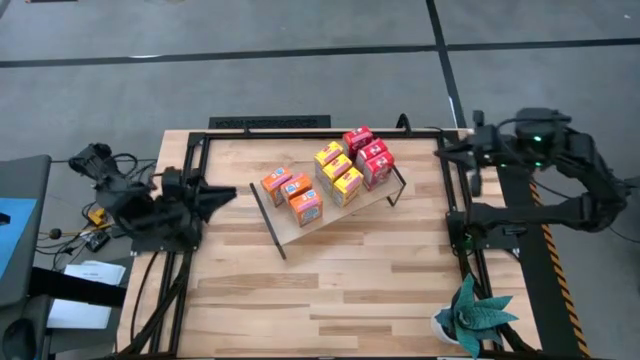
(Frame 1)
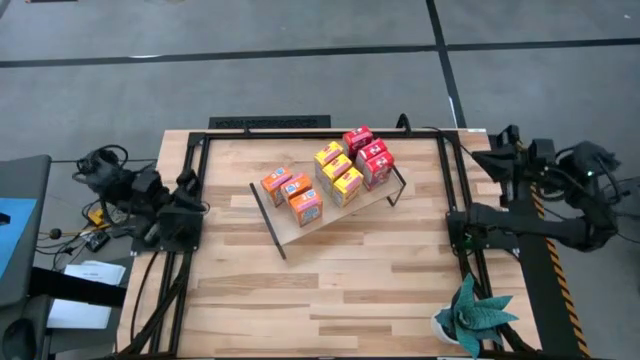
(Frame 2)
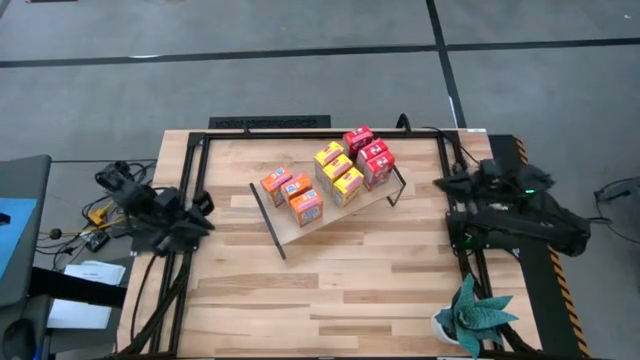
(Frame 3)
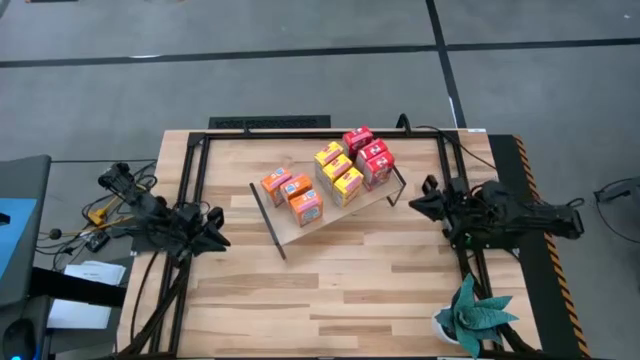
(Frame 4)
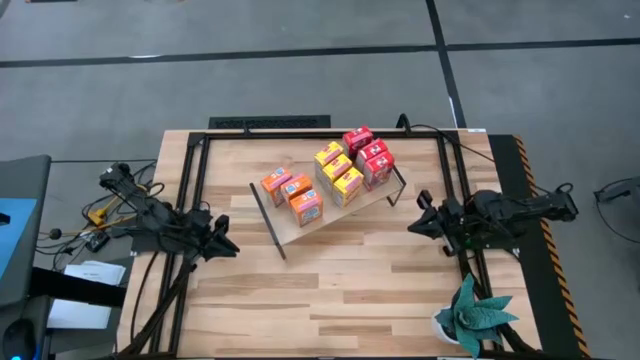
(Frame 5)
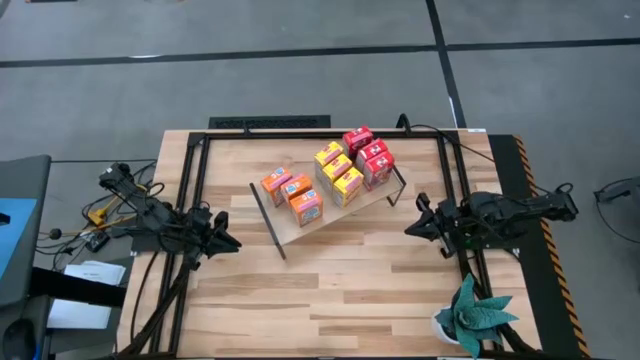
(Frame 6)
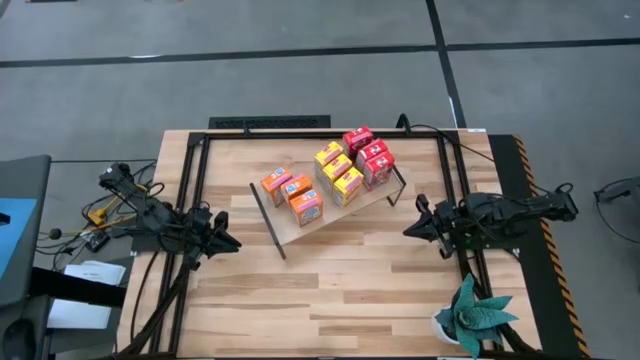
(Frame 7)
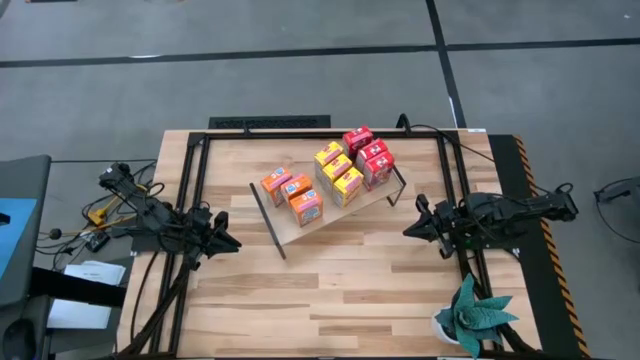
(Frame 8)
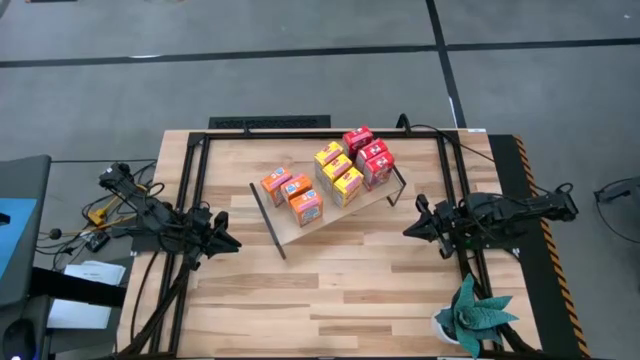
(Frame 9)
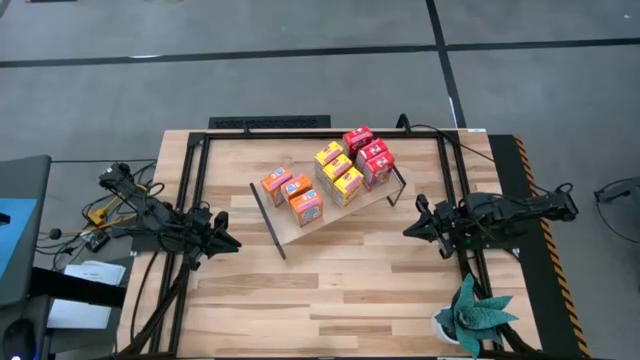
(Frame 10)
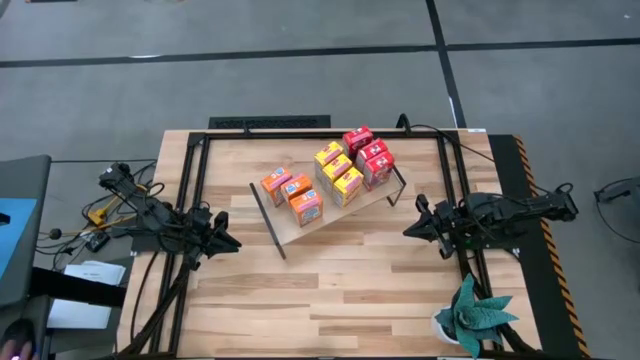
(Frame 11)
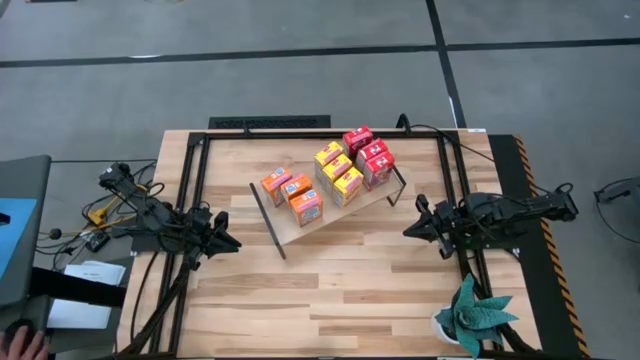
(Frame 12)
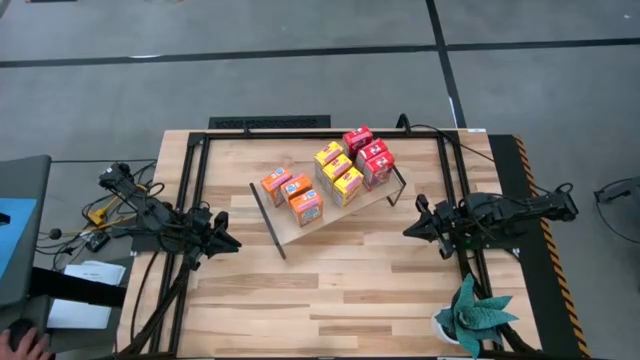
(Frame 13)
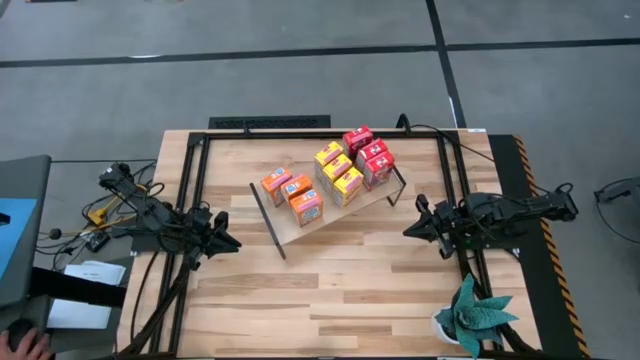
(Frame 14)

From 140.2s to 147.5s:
Task: Stack cereal on shelf
Return to Home Position

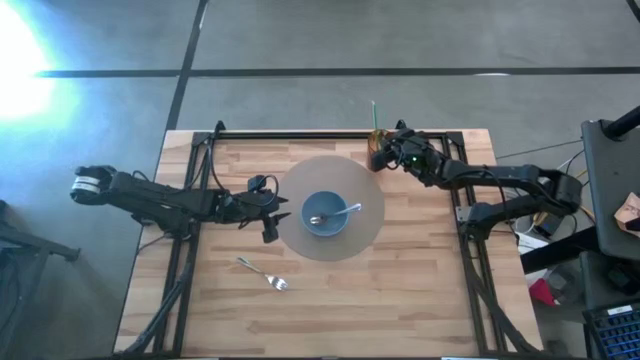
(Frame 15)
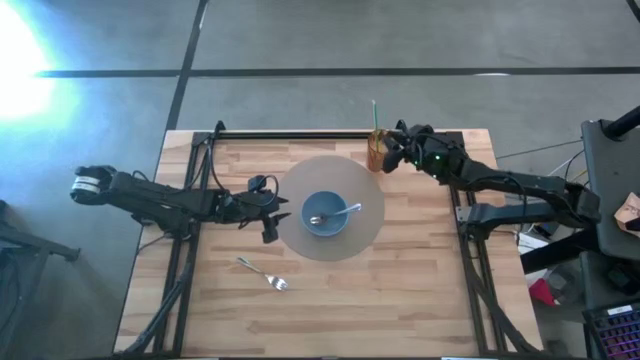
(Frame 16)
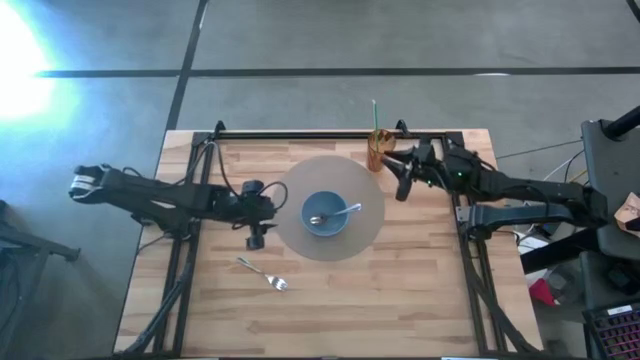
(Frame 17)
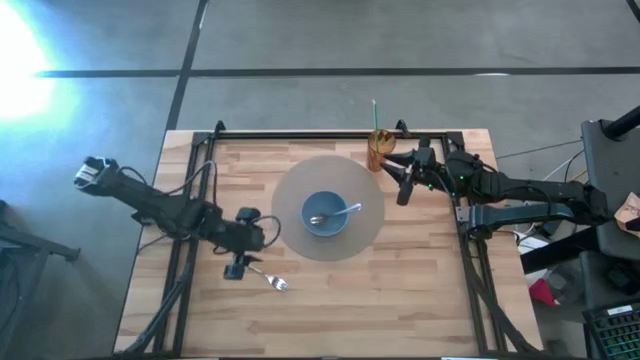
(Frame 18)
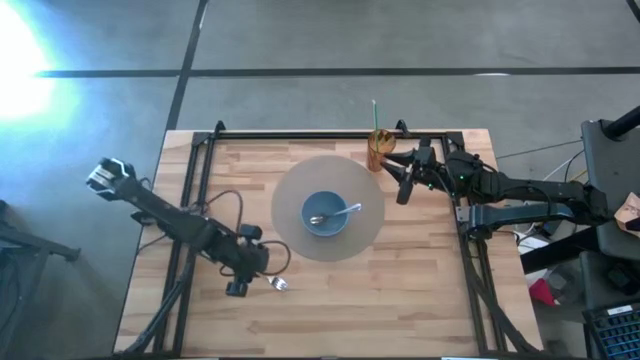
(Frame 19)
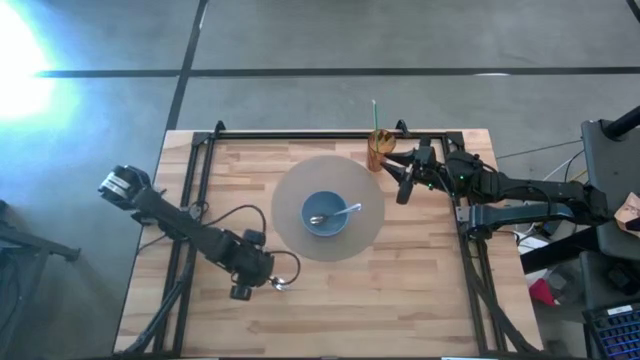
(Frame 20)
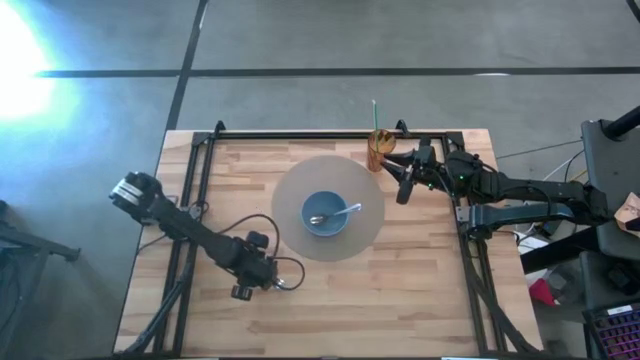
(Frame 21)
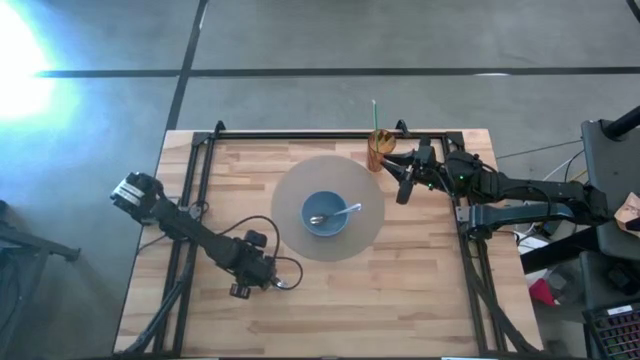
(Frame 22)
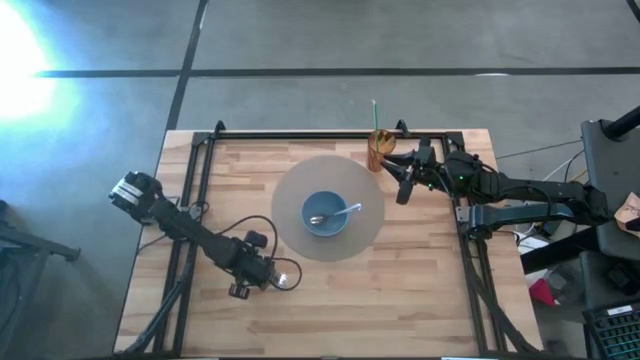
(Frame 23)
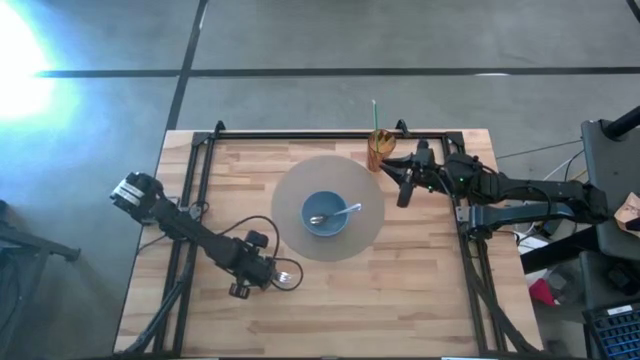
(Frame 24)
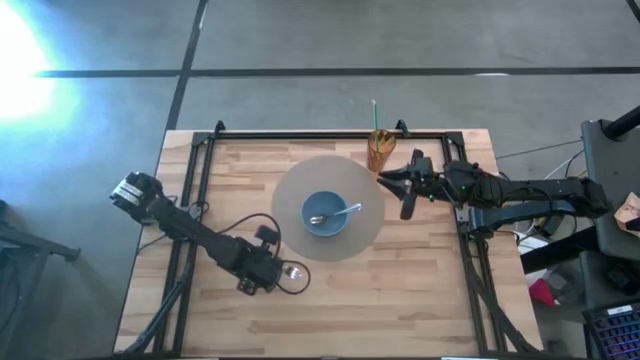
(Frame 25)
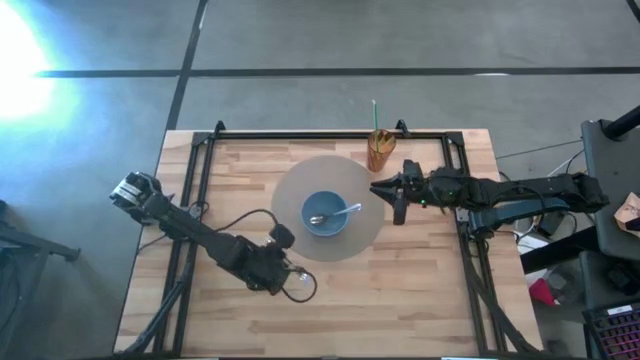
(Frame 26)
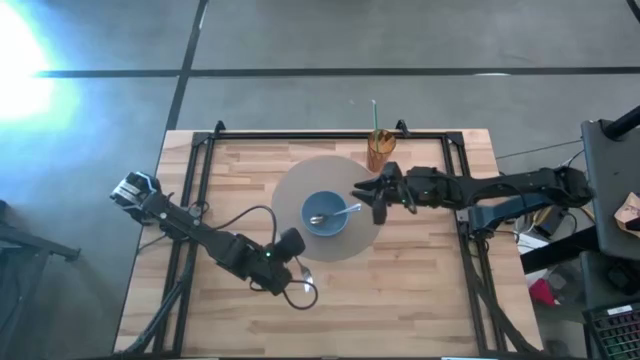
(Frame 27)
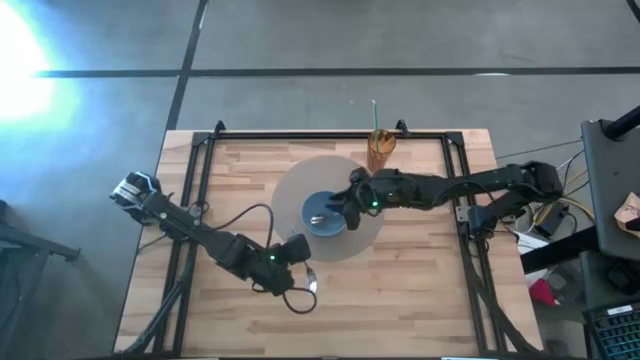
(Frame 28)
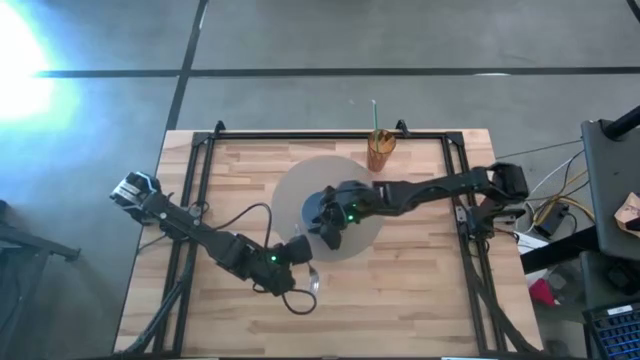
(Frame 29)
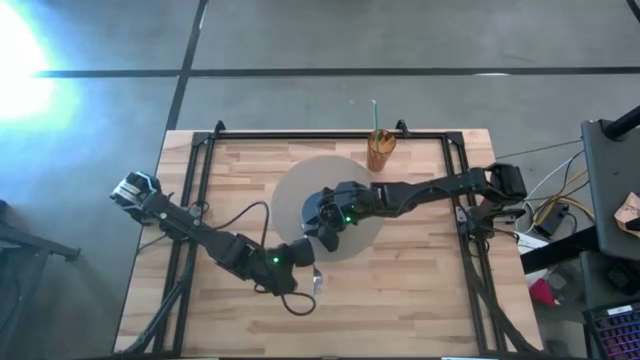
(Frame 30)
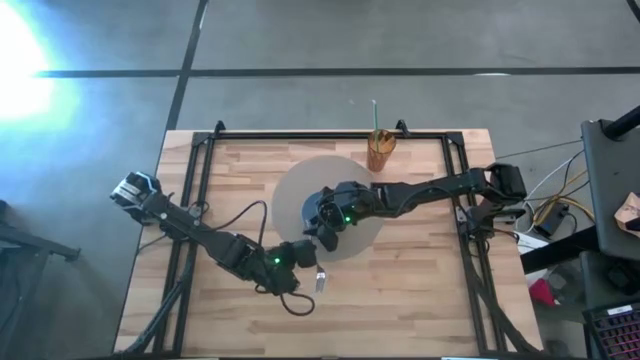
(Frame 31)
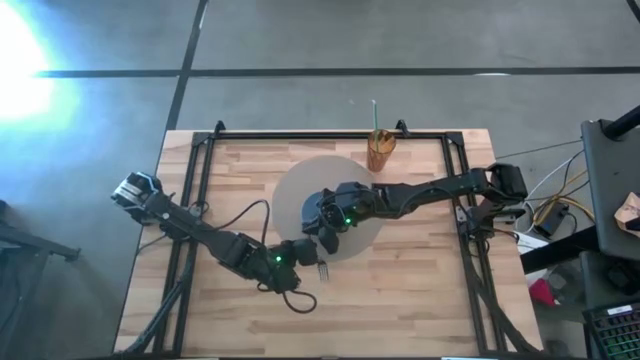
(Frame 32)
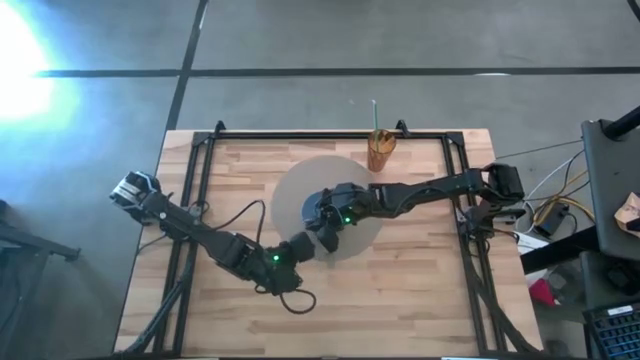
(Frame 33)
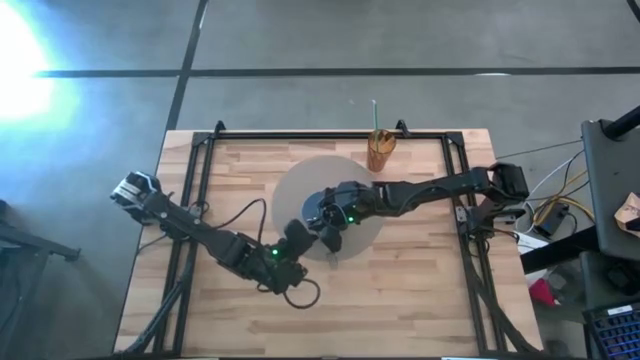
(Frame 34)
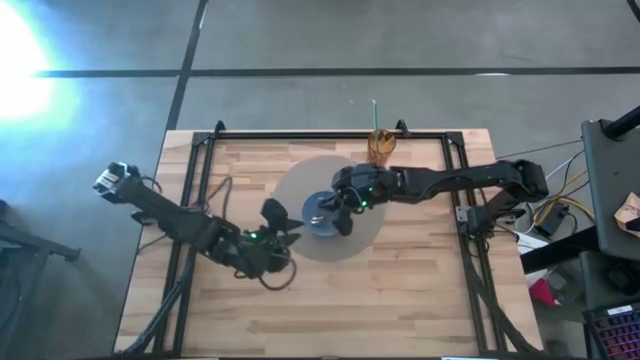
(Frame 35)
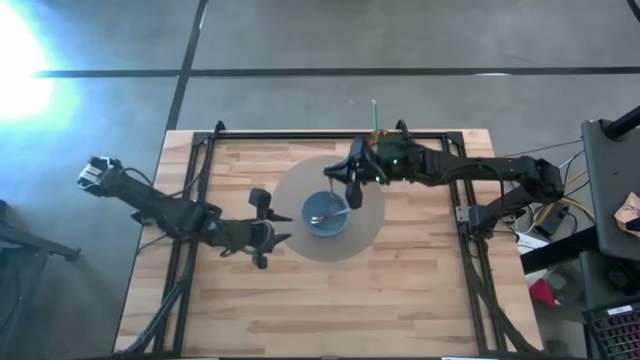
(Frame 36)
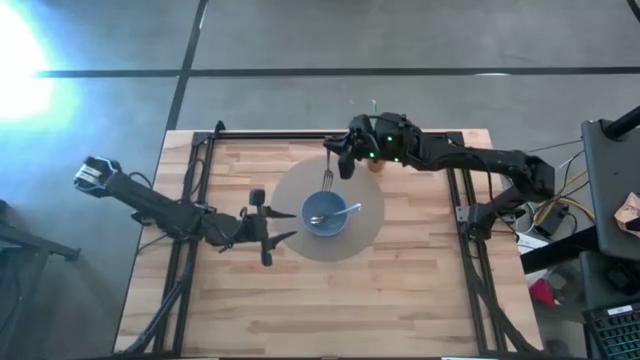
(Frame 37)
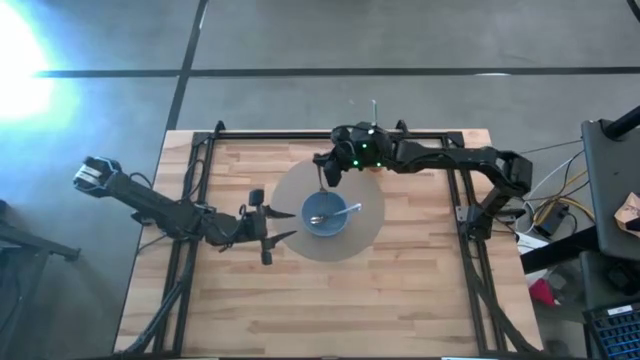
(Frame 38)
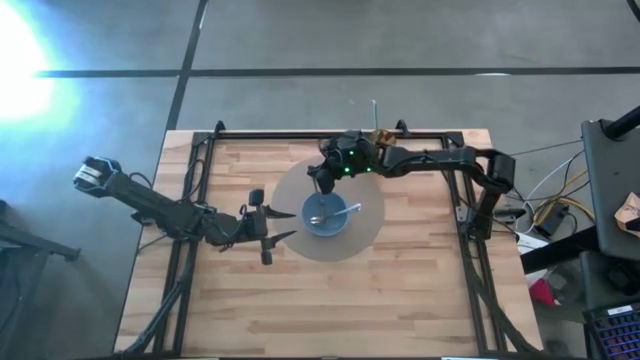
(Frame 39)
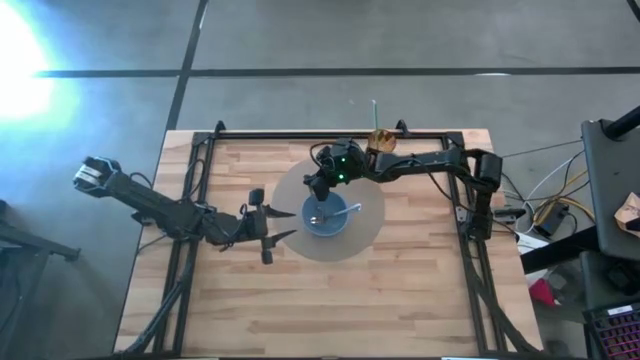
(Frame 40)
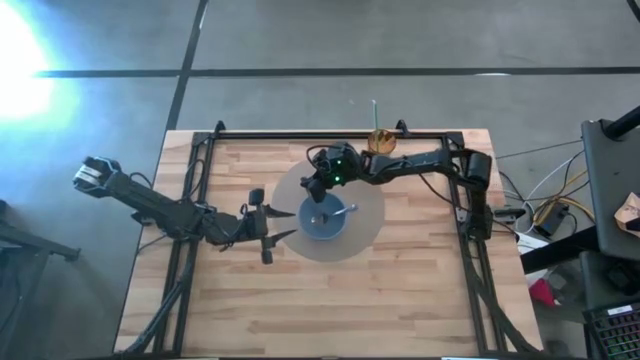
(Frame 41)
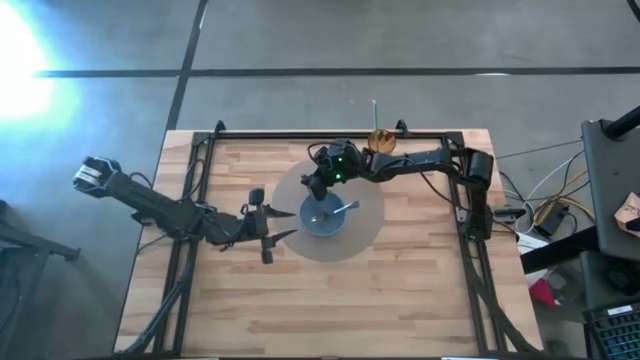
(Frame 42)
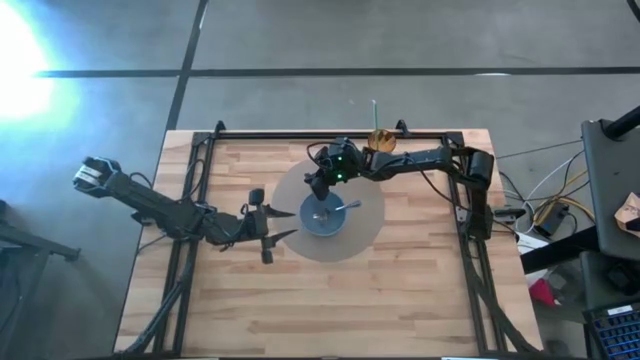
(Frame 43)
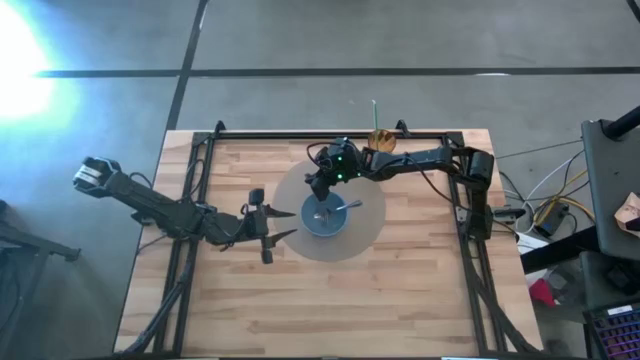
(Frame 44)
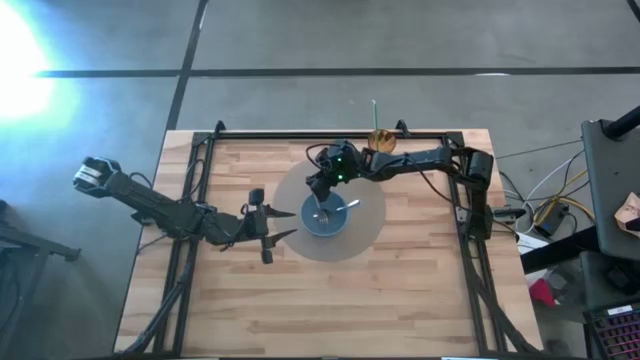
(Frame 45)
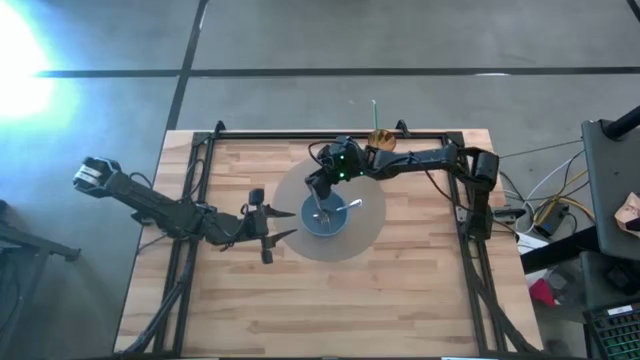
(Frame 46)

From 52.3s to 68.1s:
Task: Pick & Place Utensil
Put the fork into the bowl
